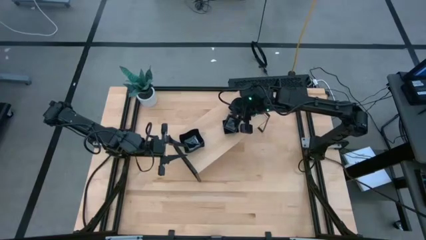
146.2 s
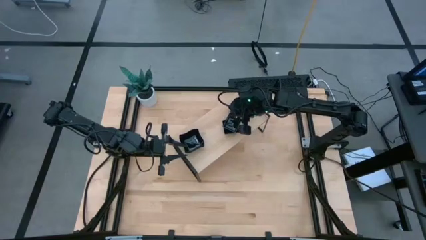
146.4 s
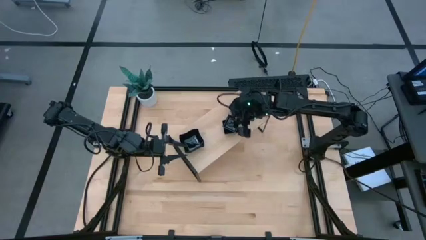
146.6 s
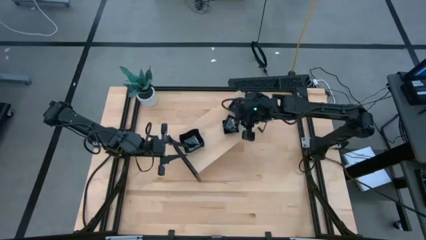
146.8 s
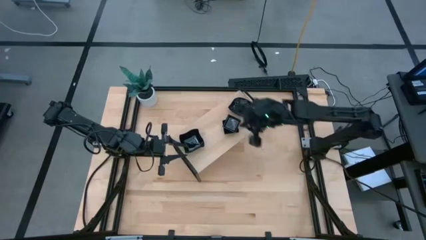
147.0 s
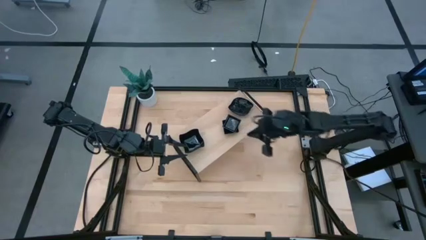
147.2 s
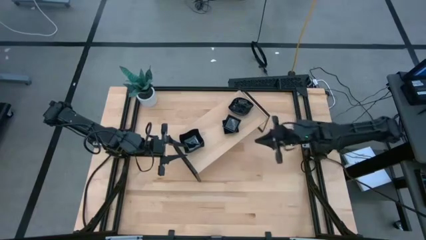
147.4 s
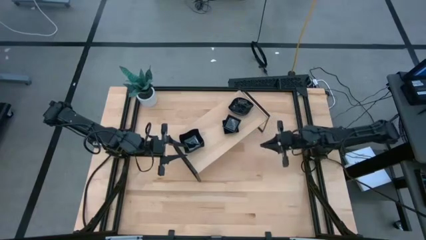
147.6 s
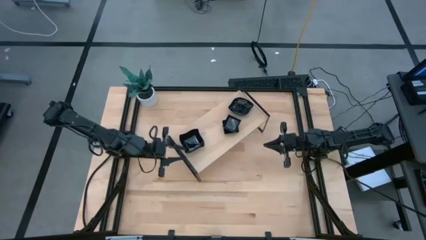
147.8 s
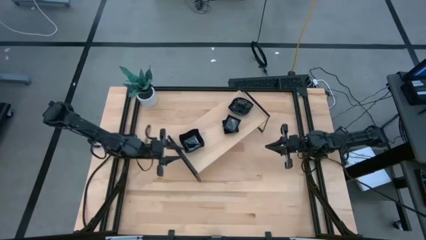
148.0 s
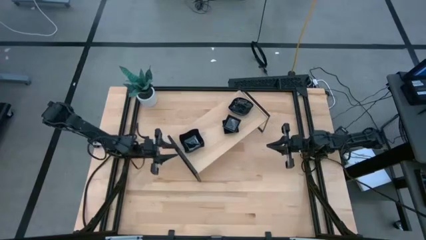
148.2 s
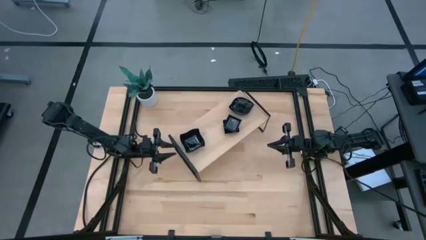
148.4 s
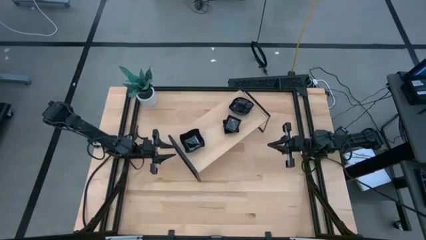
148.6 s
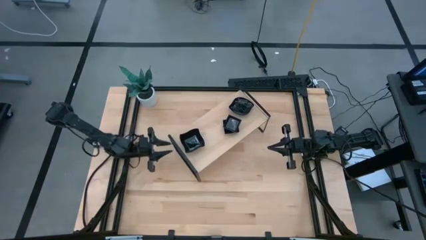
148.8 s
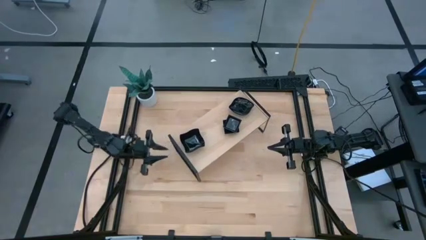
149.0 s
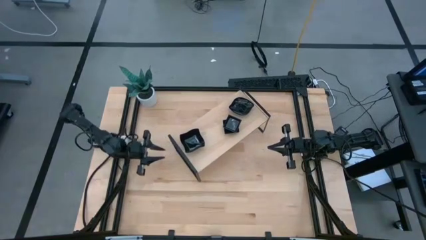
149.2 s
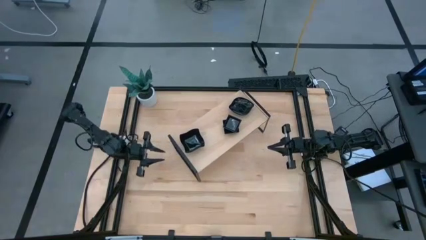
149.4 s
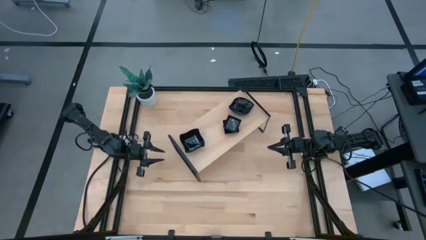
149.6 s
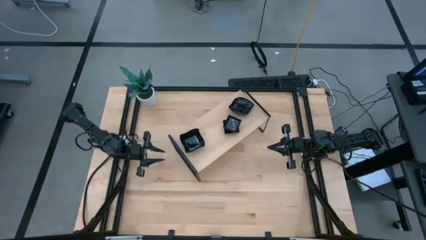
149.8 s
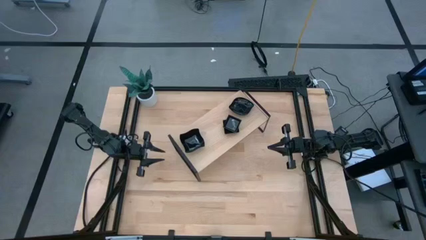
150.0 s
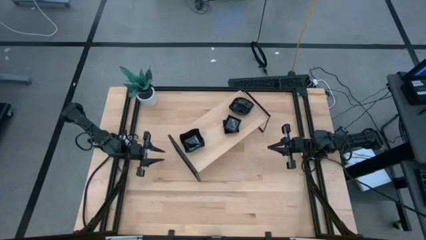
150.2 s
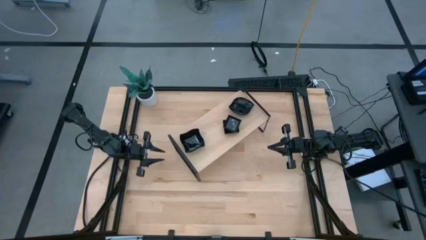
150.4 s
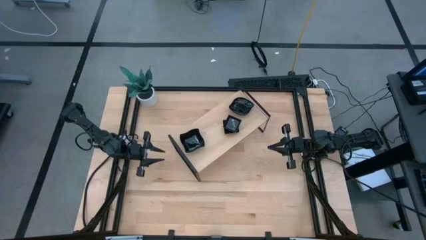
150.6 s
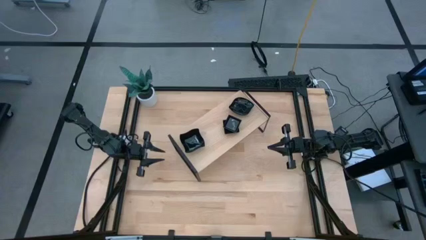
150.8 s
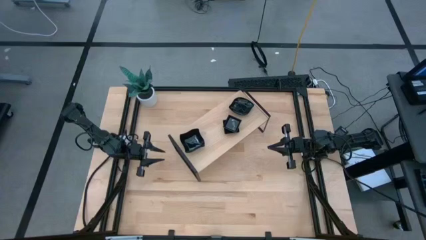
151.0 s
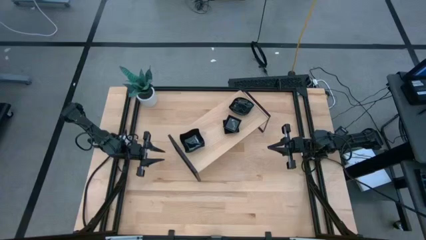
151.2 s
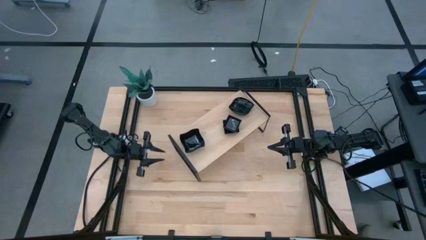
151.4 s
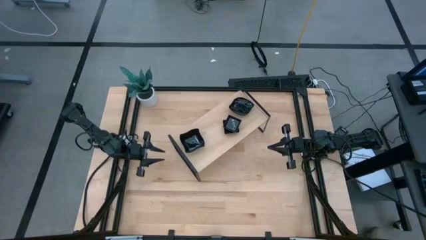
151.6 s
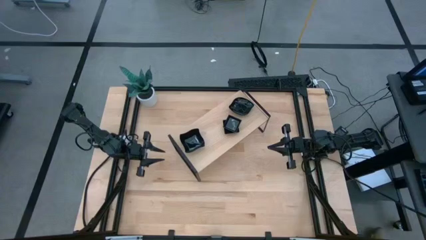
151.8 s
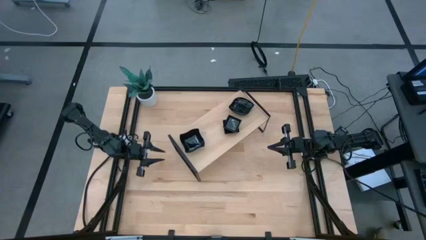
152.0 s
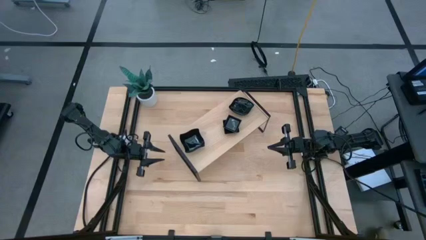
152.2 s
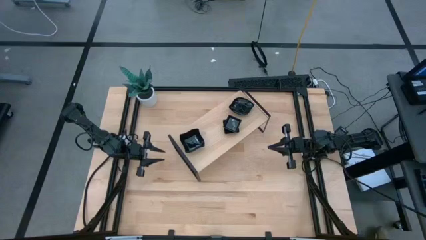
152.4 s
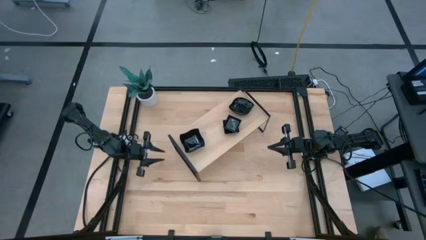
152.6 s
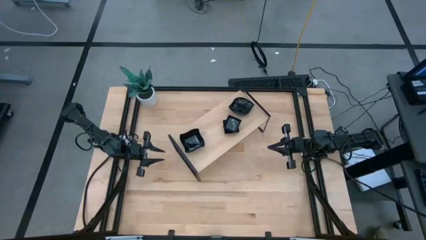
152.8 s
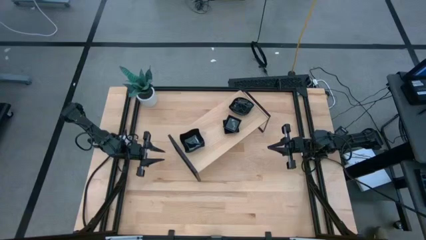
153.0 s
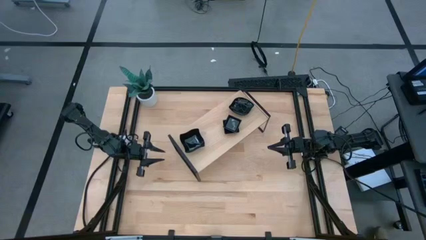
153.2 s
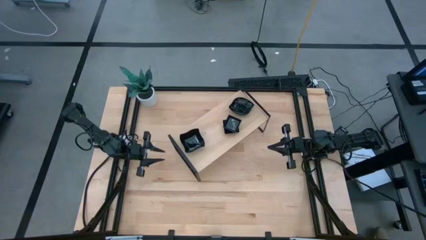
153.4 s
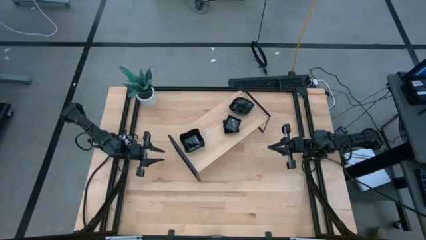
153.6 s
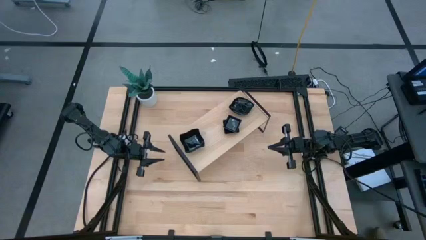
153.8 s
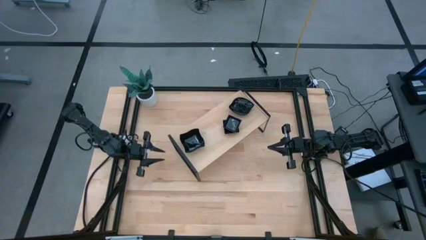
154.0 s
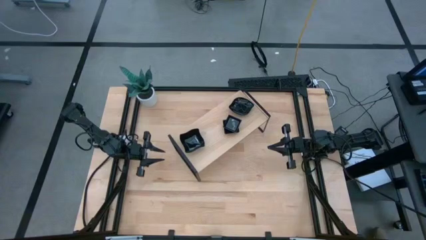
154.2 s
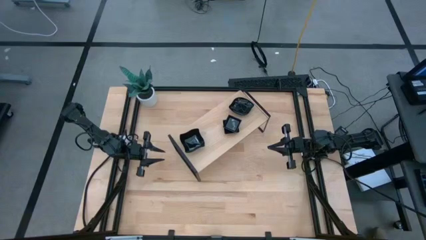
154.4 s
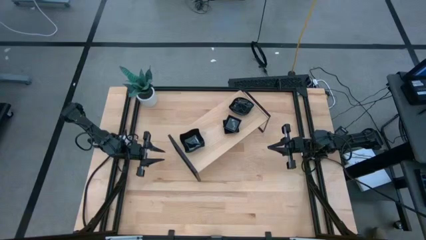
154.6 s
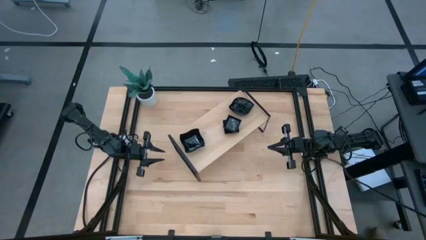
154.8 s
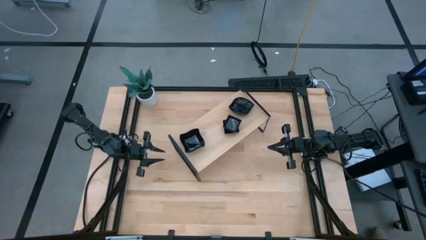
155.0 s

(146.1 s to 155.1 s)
Task: Pick & Place Mini shaped plates
Return to Home Position

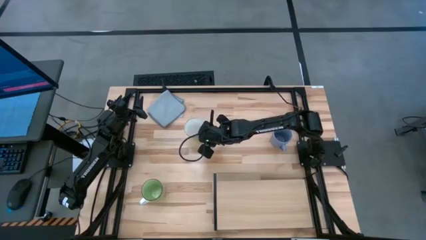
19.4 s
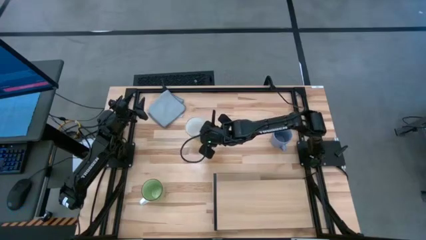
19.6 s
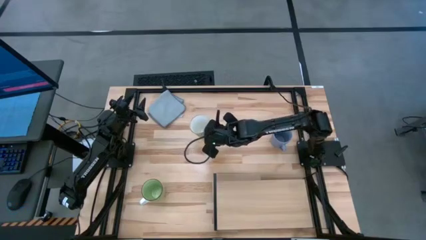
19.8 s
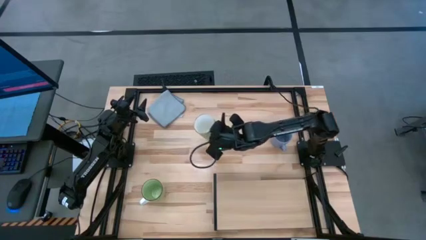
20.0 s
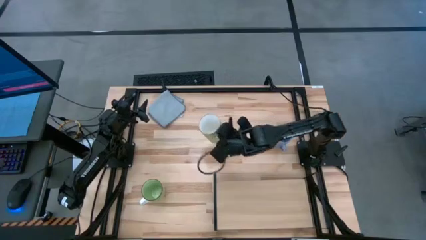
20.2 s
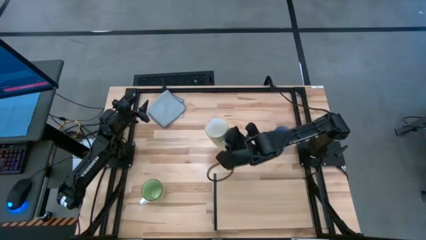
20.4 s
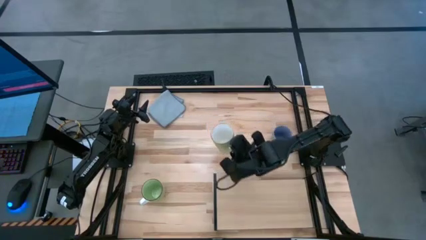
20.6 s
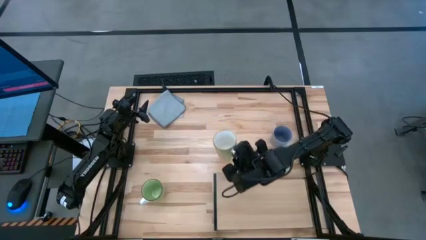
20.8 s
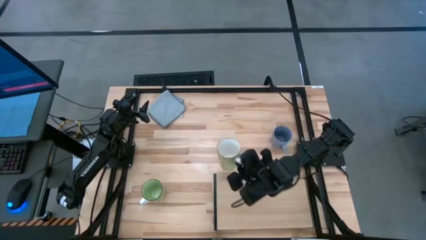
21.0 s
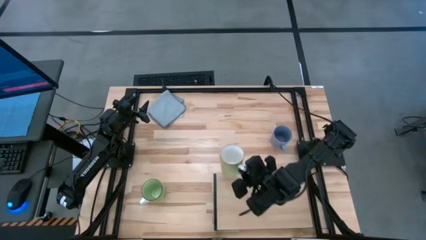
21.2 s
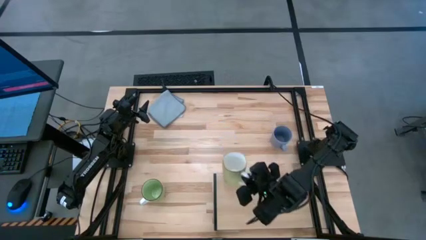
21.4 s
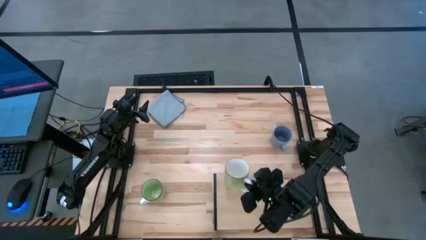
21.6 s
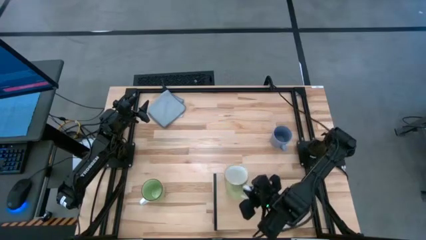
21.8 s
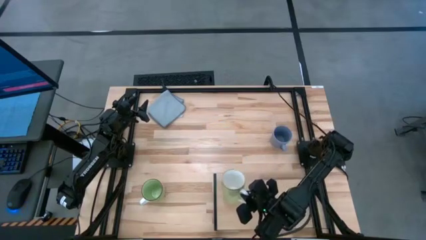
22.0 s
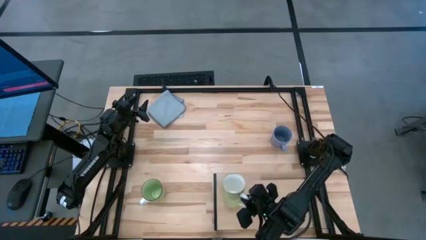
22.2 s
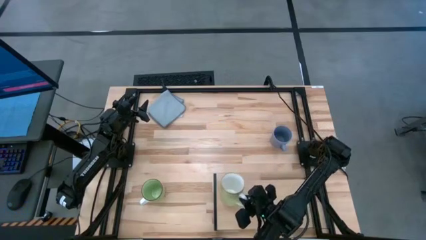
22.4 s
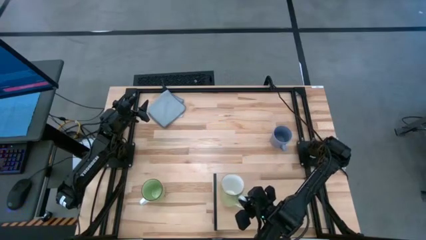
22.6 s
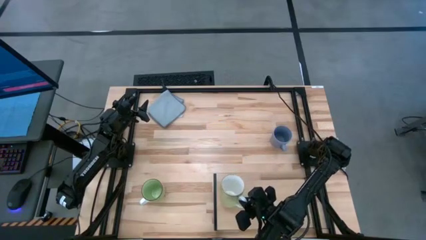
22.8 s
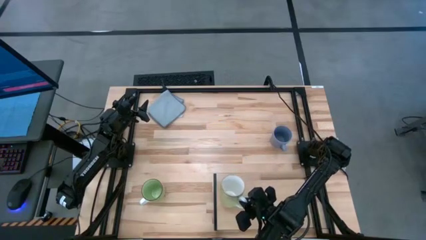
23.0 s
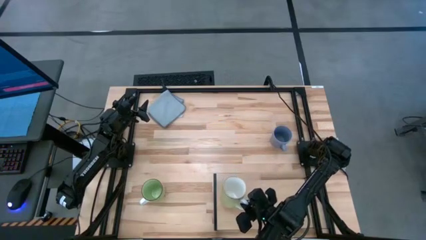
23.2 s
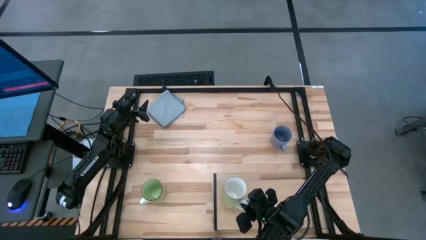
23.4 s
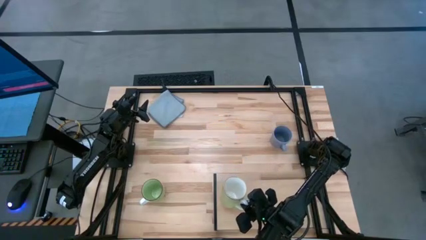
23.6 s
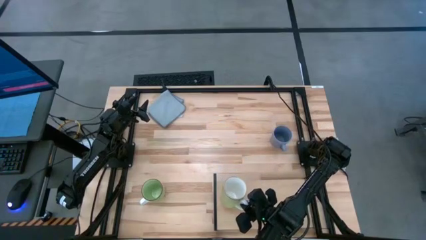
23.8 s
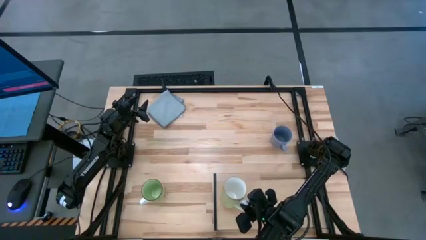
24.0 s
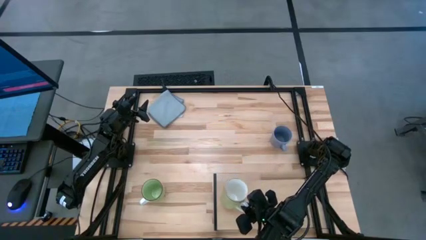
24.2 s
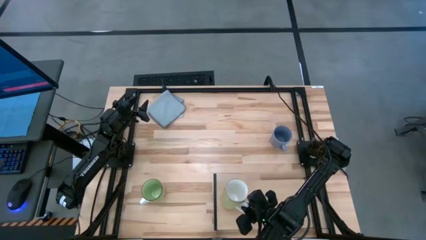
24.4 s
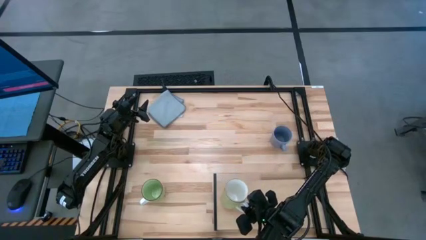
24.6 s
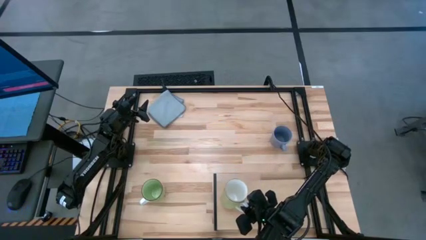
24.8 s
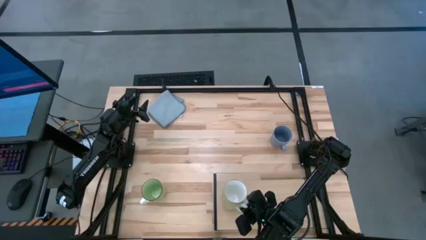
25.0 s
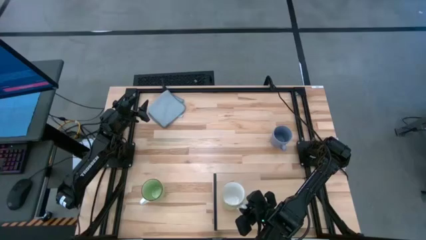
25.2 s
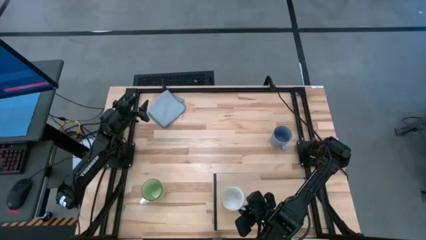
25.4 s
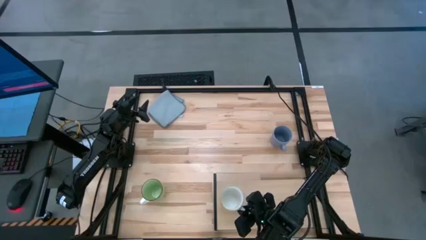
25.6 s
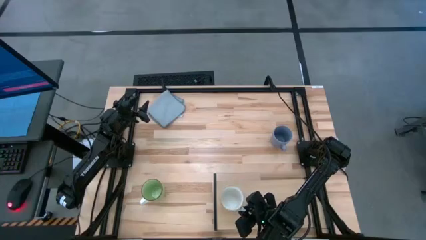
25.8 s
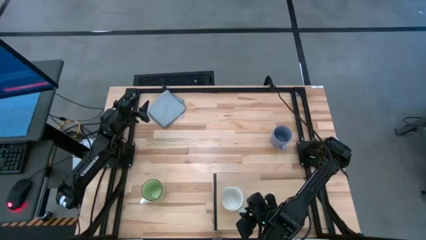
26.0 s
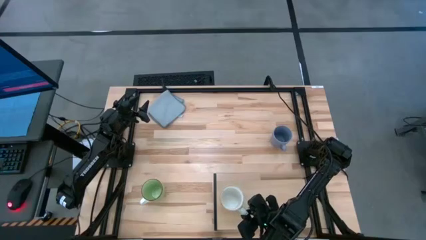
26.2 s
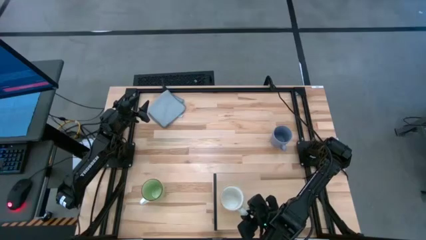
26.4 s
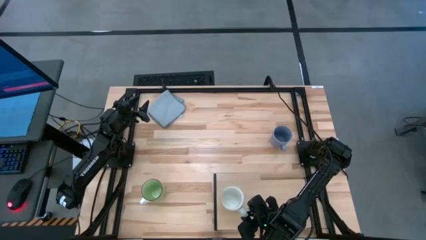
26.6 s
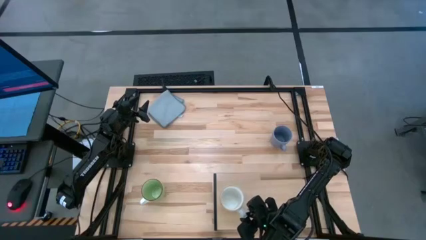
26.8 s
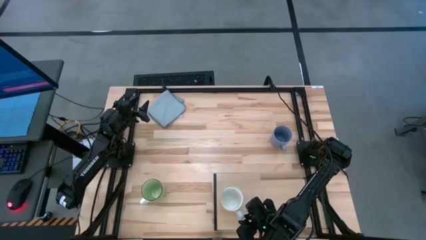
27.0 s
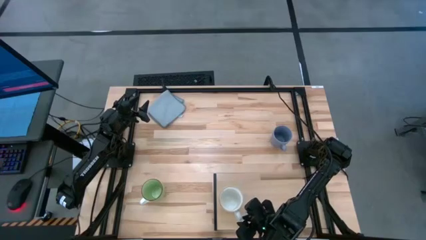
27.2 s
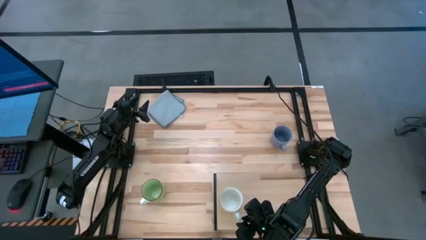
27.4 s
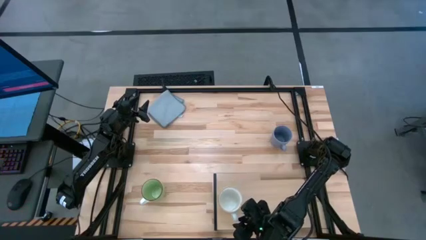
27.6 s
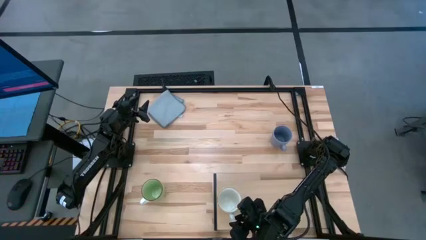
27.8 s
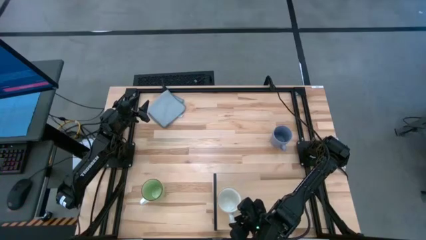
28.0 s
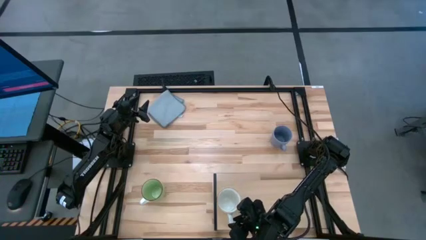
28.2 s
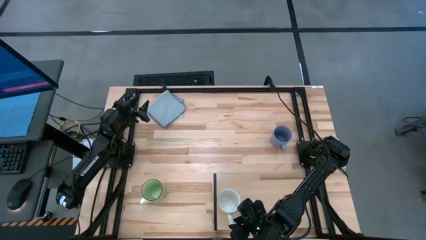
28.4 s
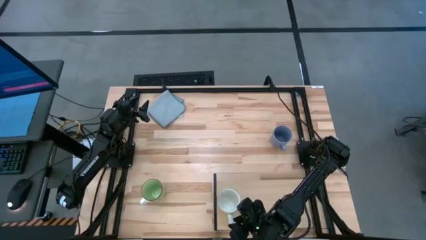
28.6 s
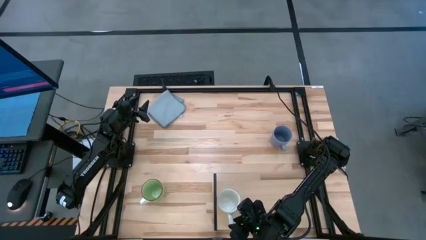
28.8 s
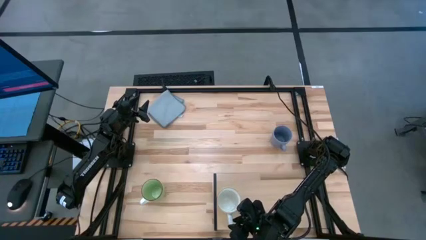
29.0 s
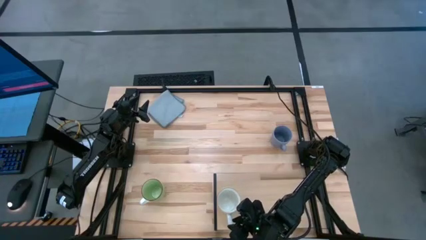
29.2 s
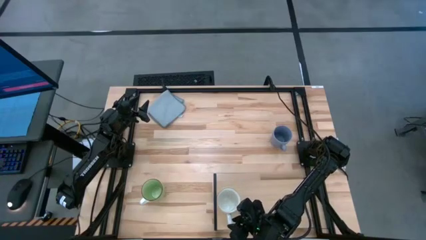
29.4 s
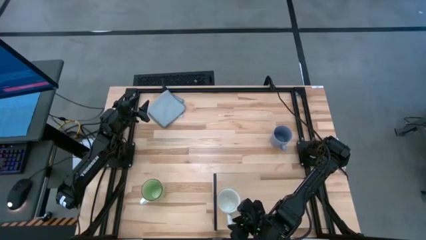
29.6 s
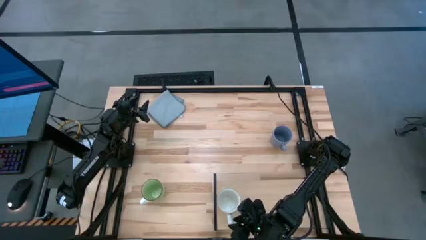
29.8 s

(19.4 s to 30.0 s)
Task: Stack small to large cups/mugs on shelf
Put the white cup on the shelf
